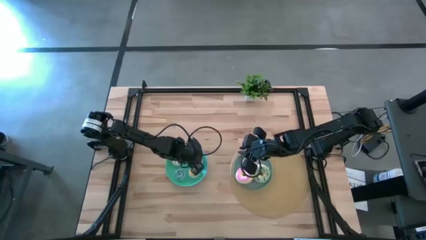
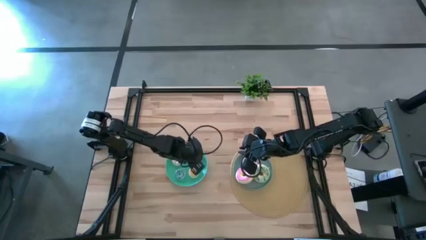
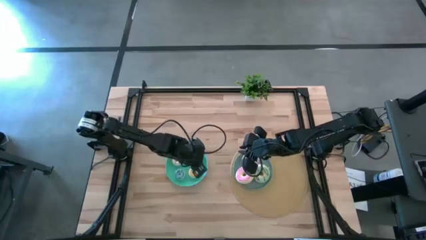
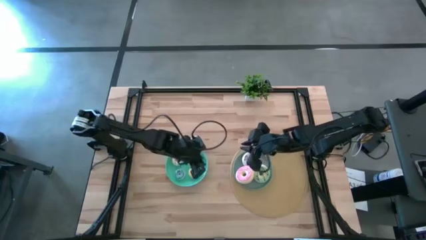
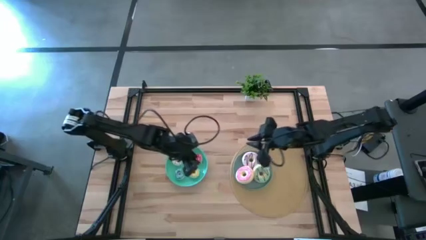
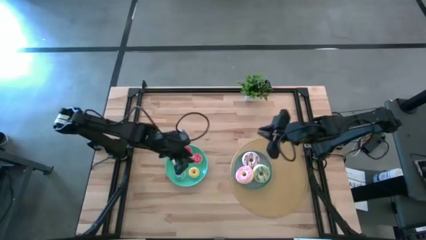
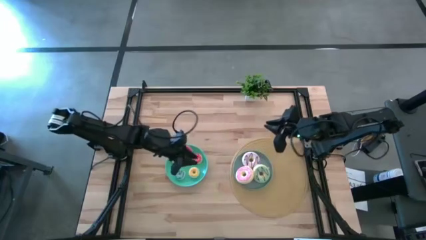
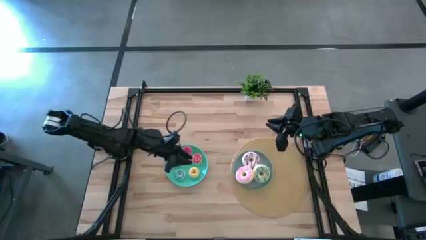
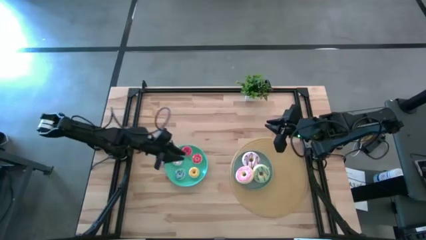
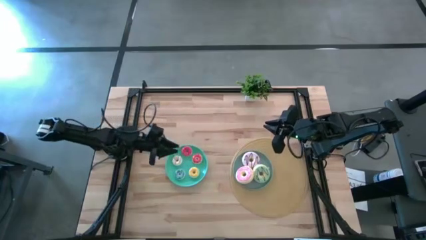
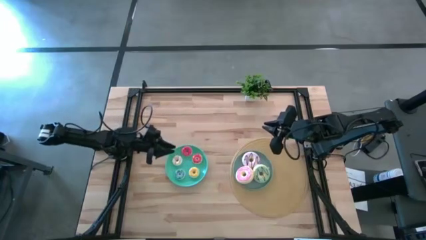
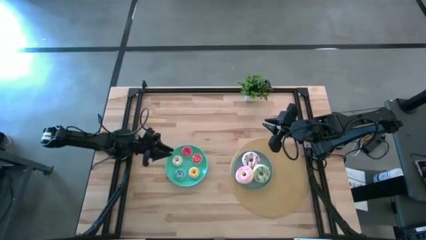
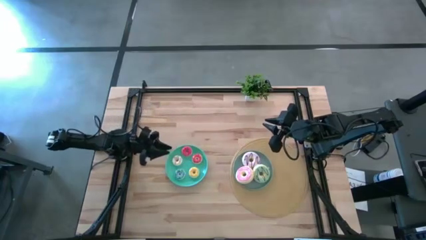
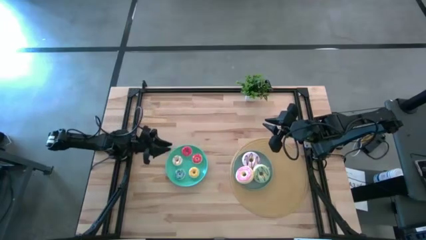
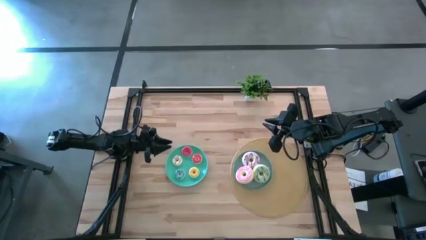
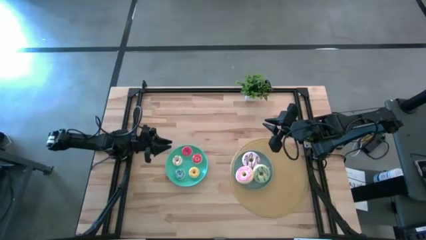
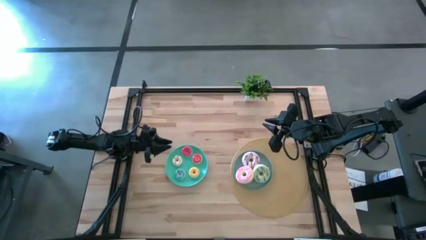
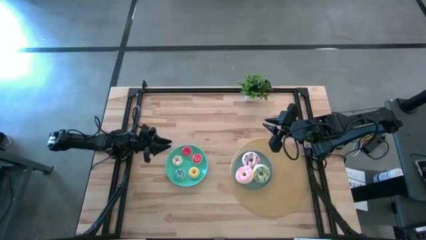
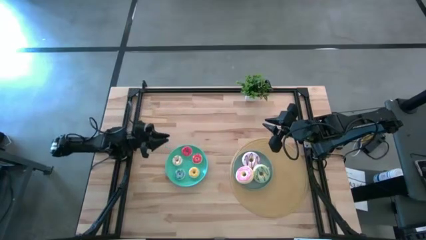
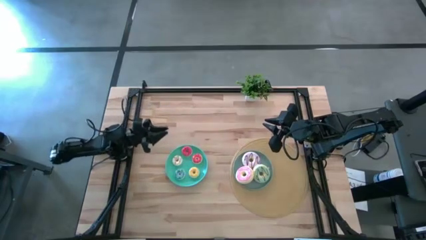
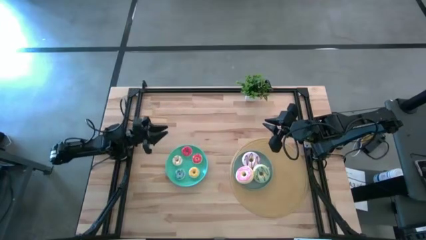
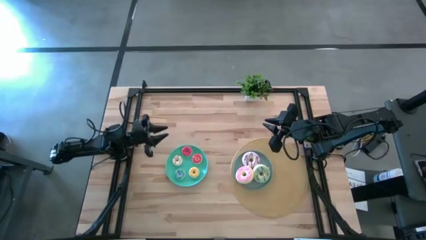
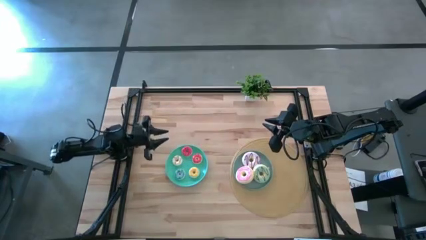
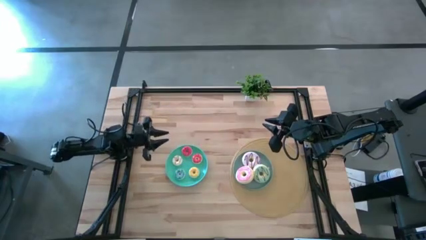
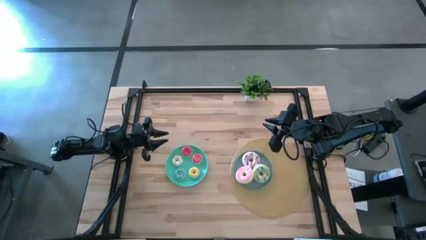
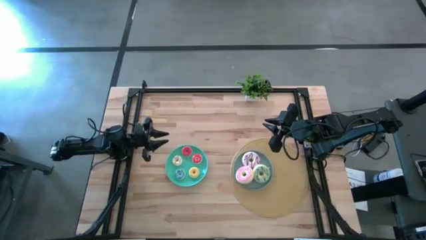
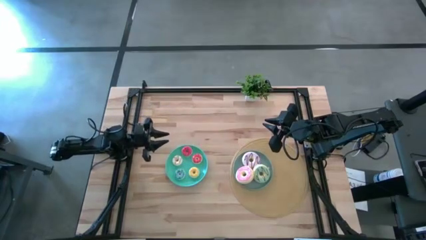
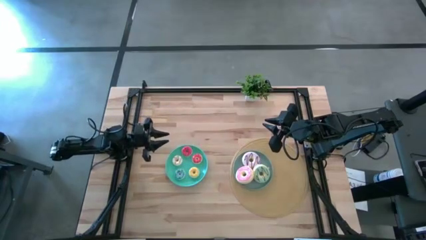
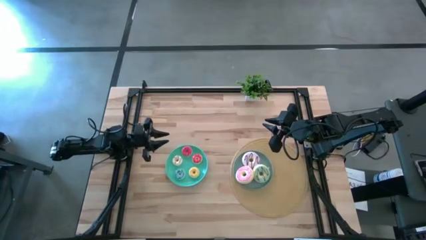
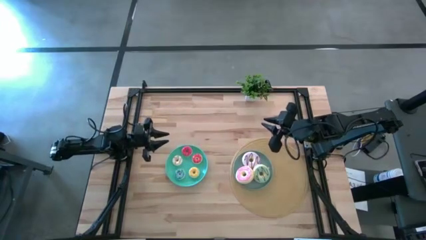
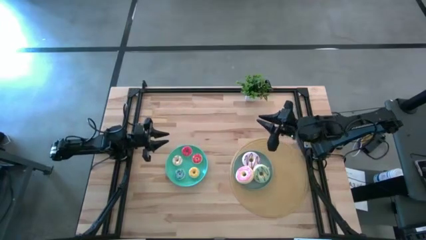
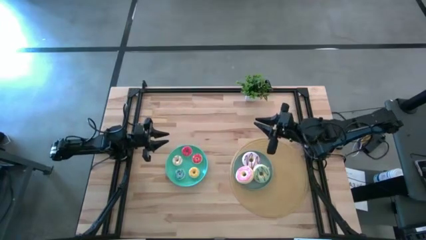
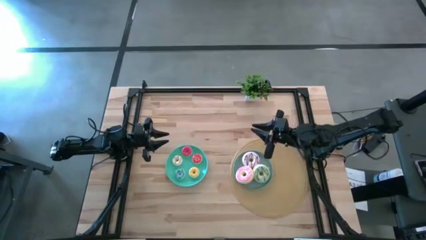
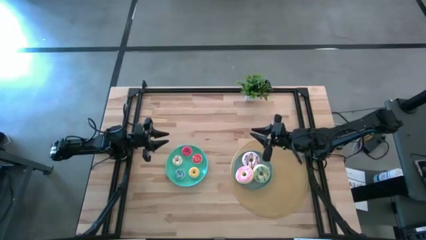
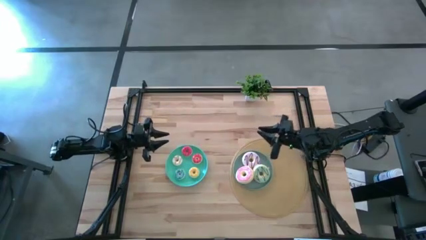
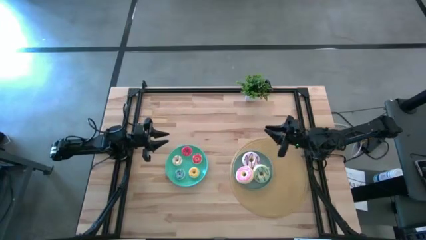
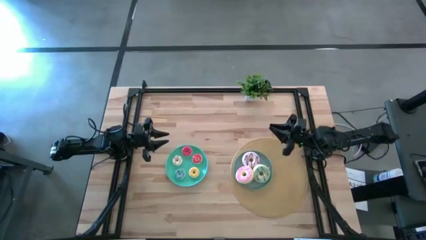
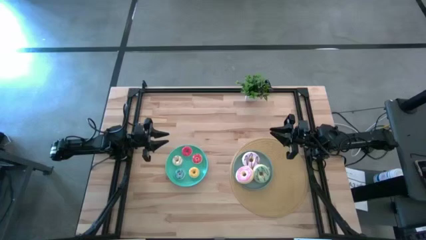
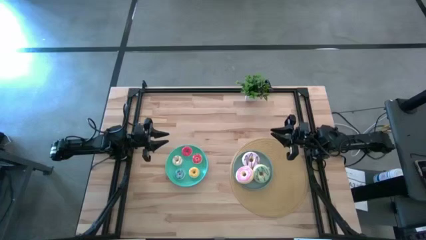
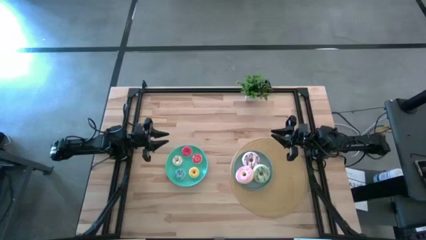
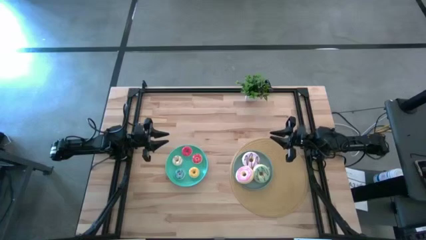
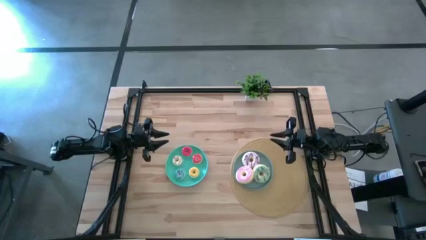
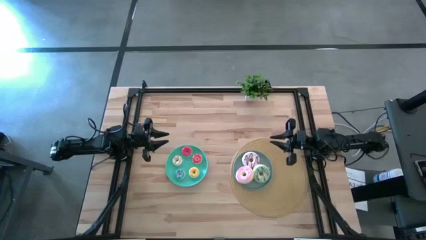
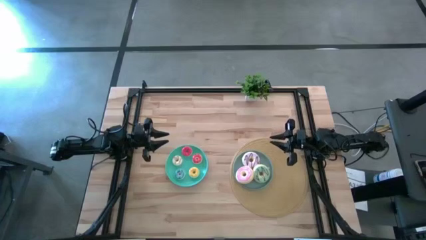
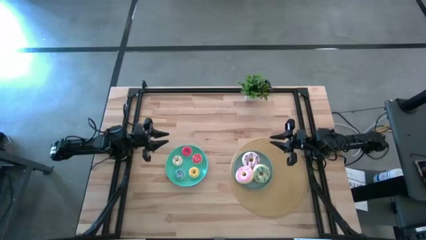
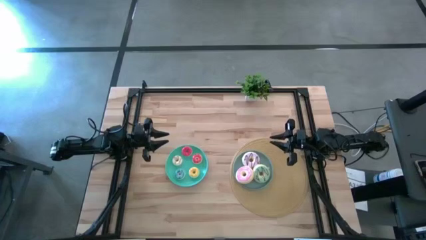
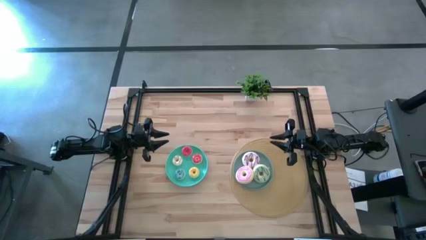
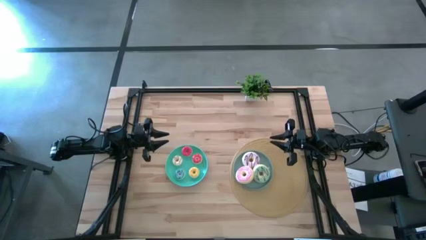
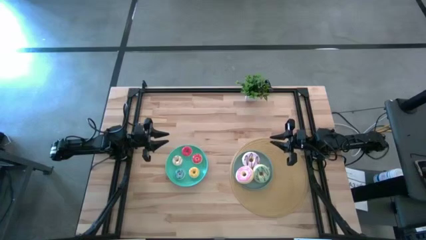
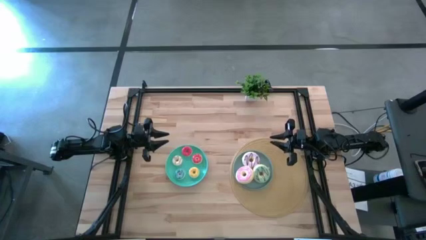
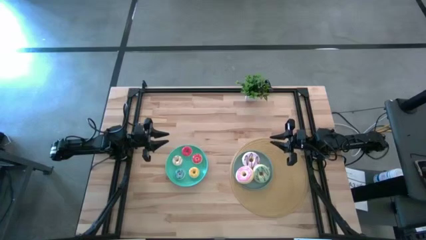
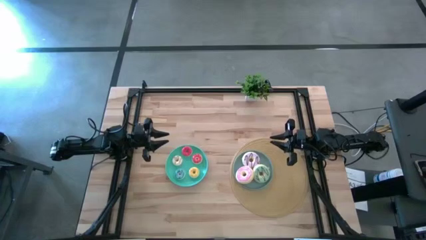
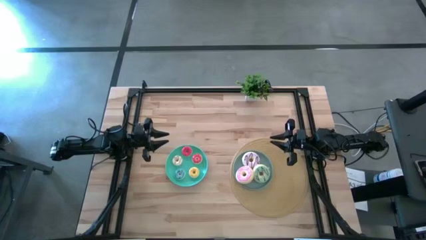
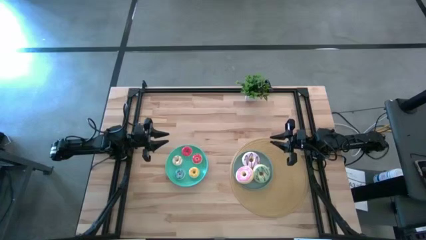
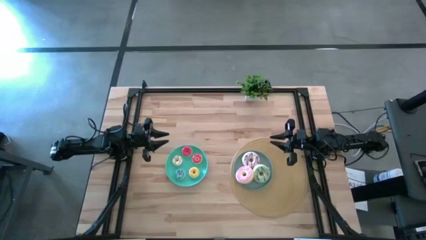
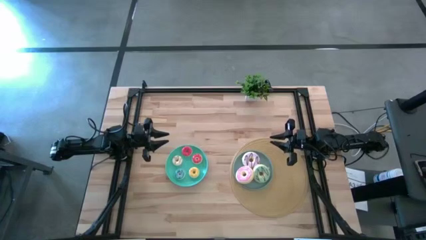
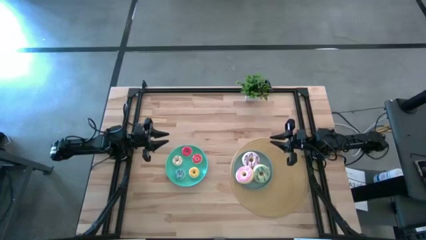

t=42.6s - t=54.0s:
Task: Pick & Place donuts
Return to Home Position

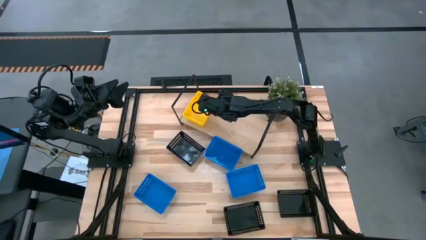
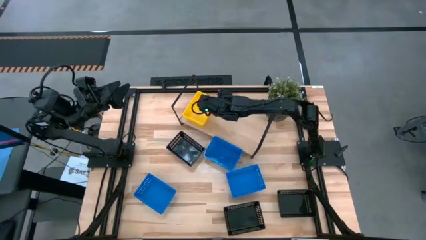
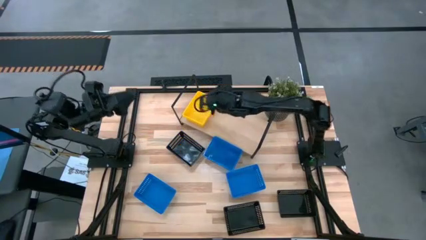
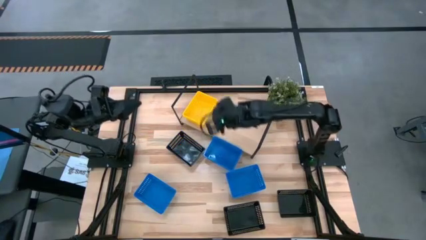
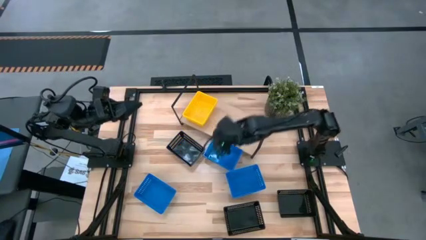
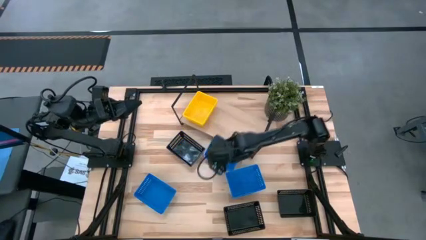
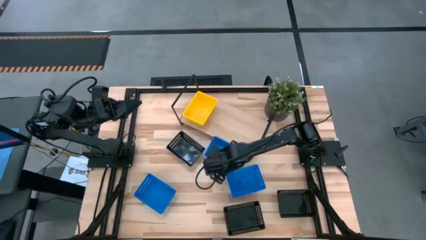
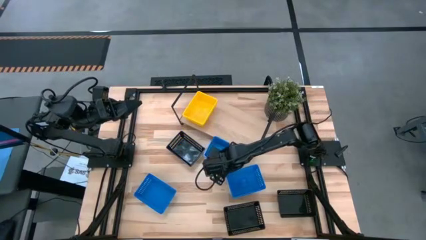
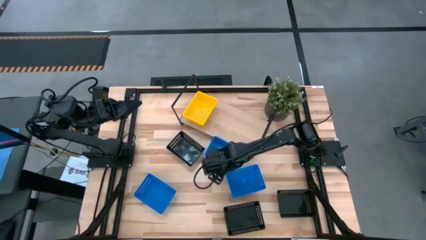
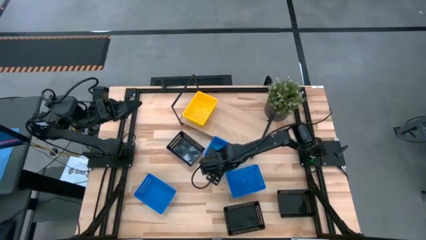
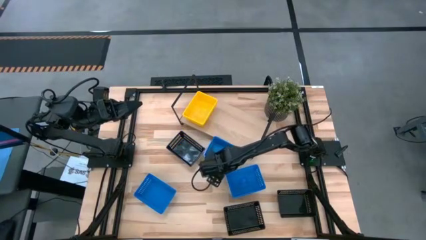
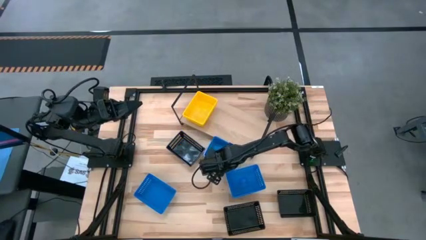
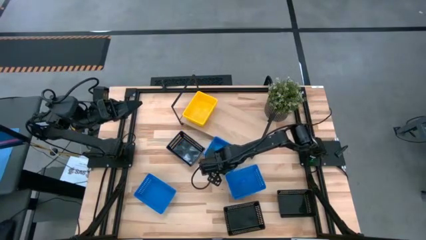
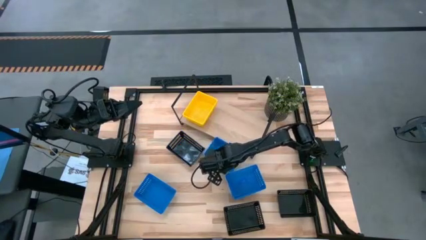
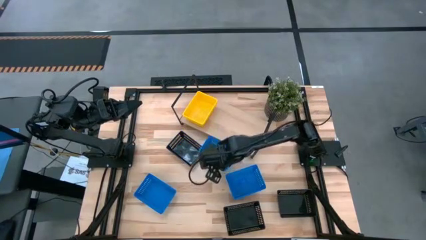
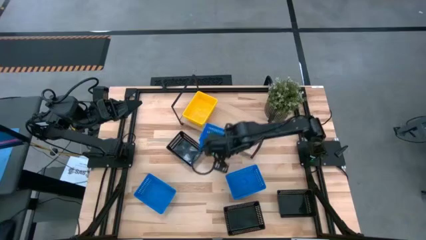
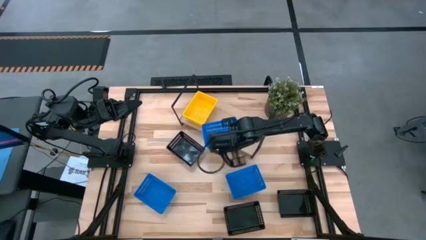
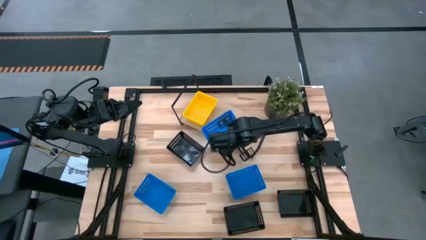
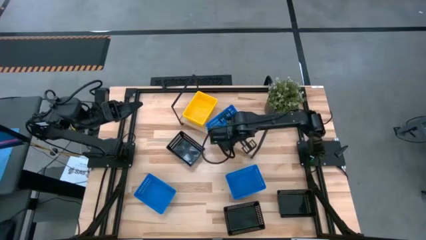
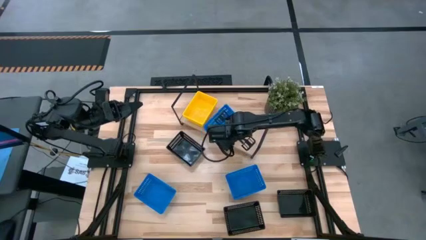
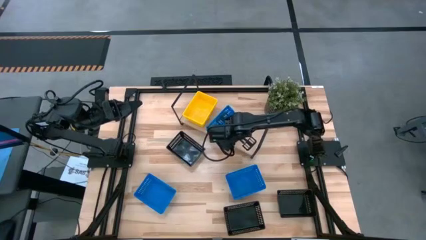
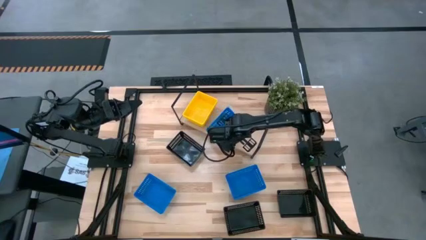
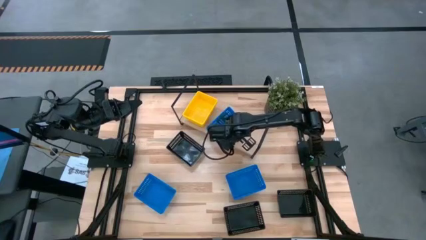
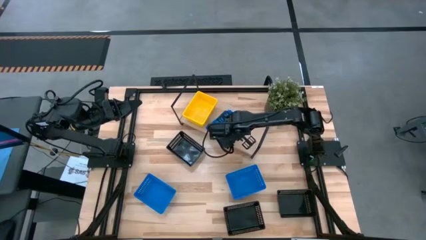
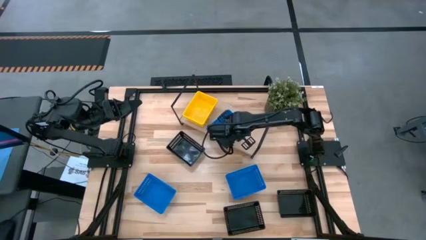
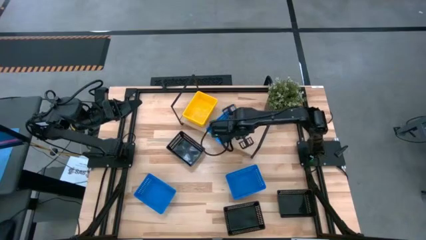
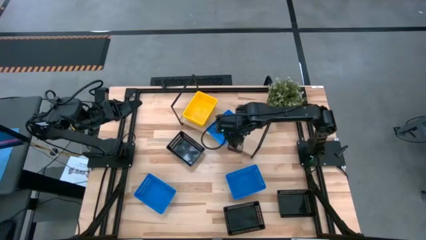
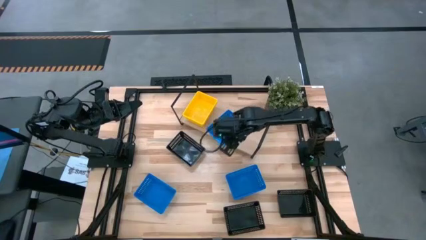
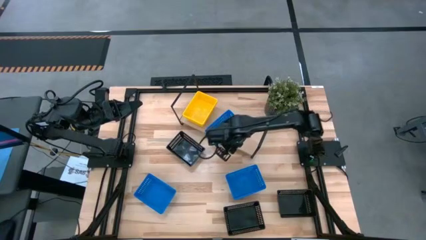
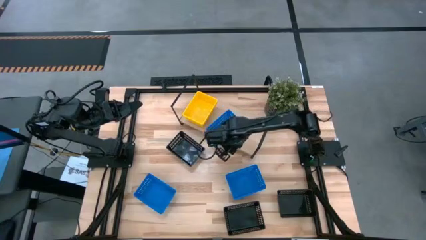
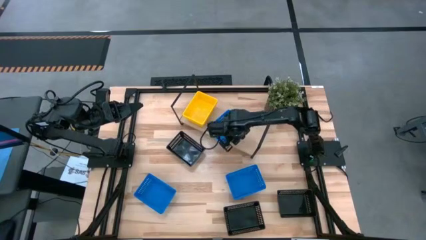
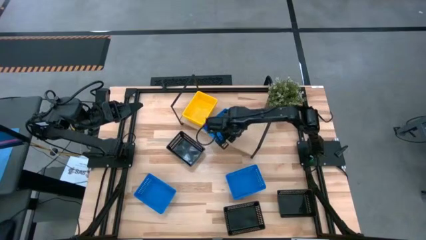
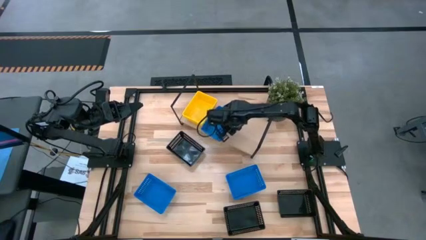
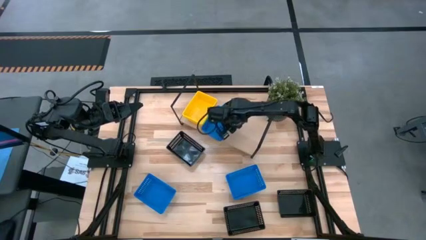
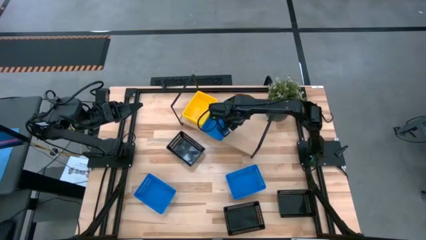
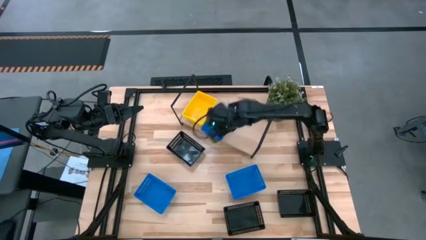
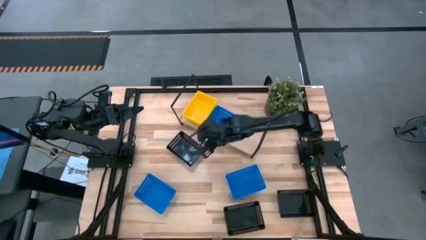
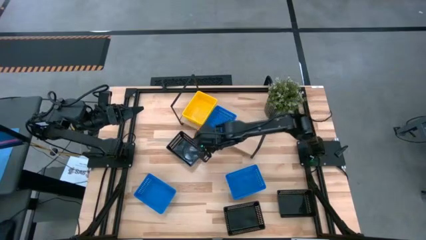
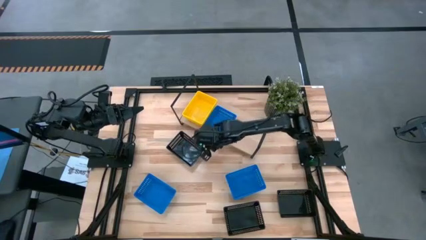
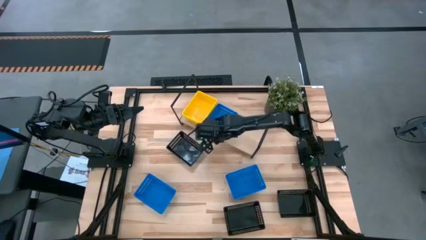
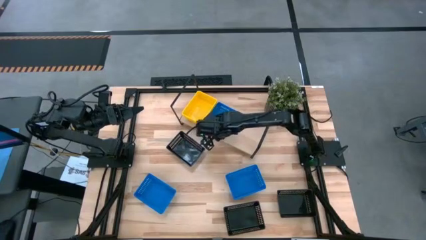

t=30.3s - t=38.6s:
Task: Stack baskets on shelf by color
Put the top right blue bin on the shelf
